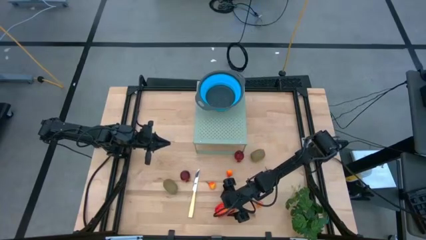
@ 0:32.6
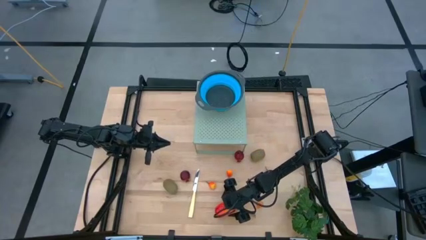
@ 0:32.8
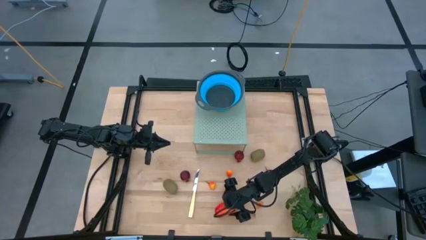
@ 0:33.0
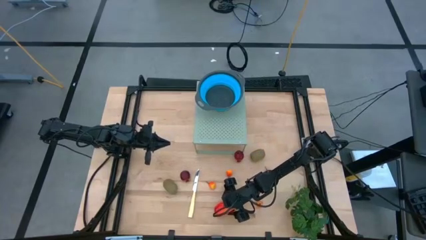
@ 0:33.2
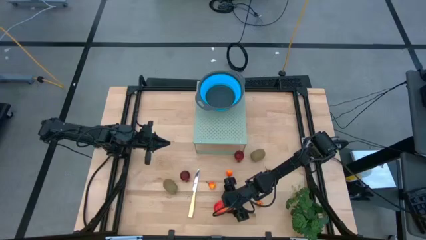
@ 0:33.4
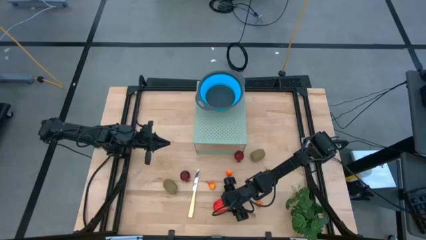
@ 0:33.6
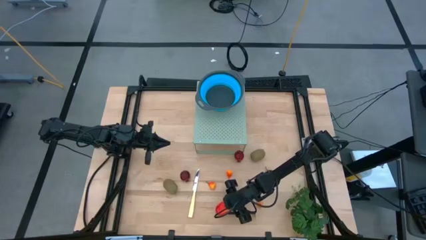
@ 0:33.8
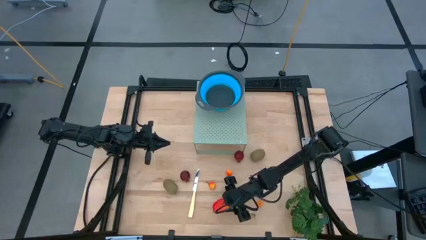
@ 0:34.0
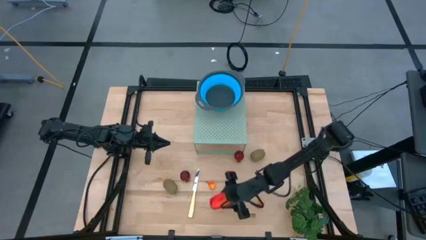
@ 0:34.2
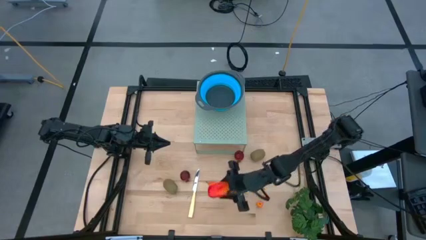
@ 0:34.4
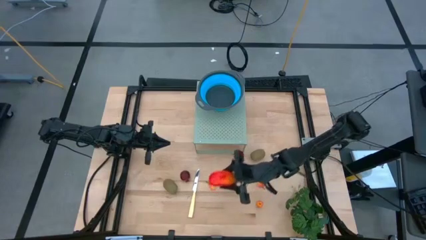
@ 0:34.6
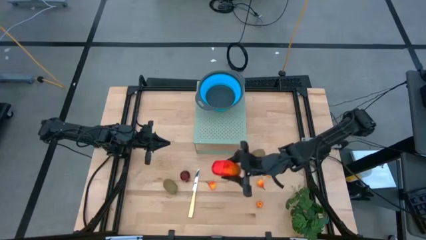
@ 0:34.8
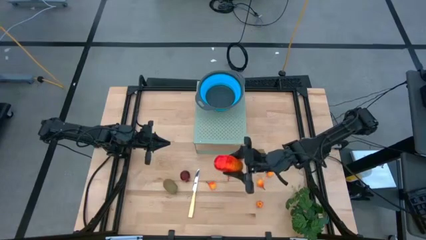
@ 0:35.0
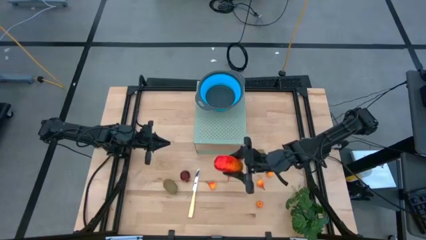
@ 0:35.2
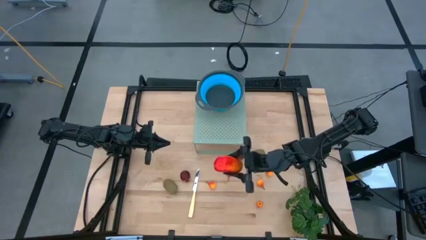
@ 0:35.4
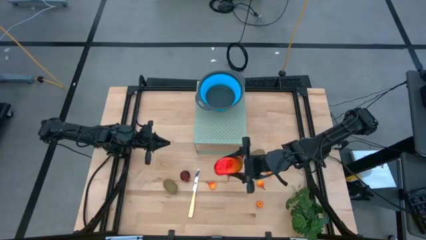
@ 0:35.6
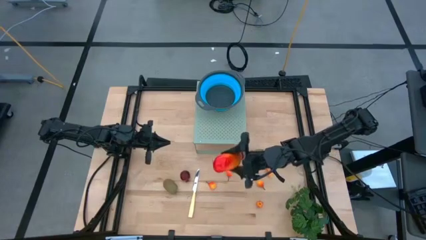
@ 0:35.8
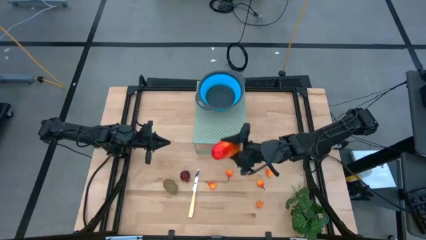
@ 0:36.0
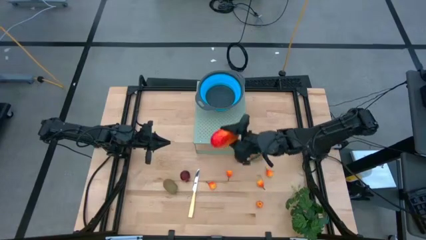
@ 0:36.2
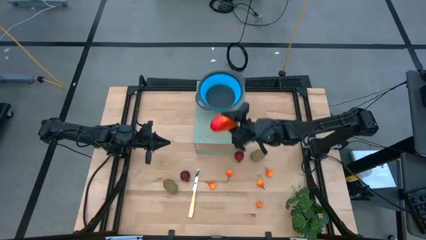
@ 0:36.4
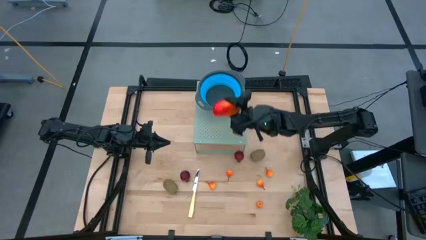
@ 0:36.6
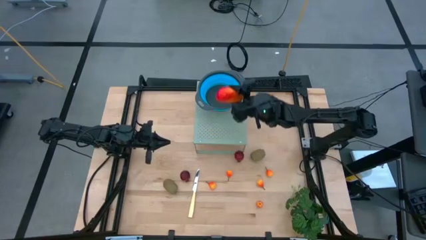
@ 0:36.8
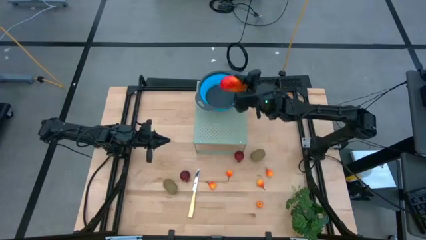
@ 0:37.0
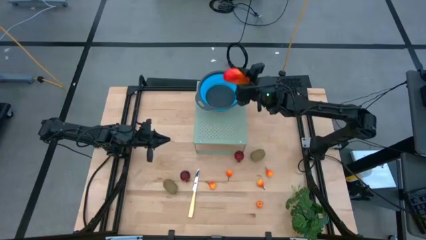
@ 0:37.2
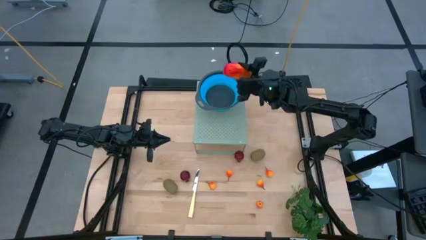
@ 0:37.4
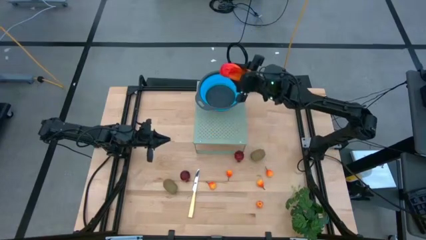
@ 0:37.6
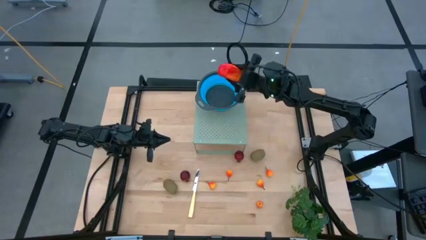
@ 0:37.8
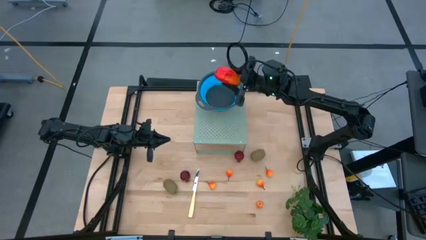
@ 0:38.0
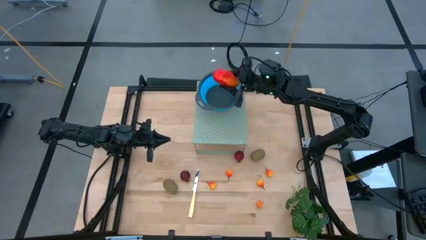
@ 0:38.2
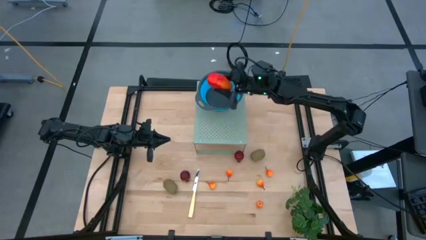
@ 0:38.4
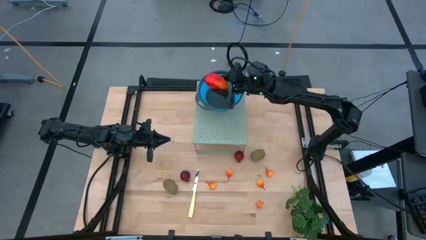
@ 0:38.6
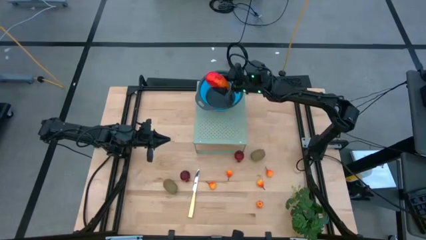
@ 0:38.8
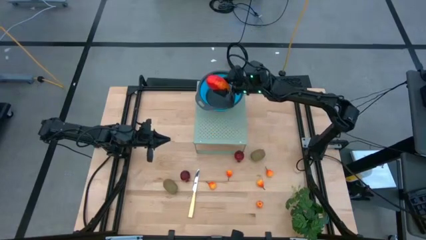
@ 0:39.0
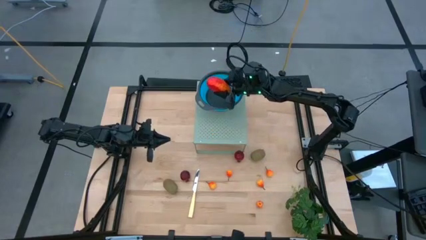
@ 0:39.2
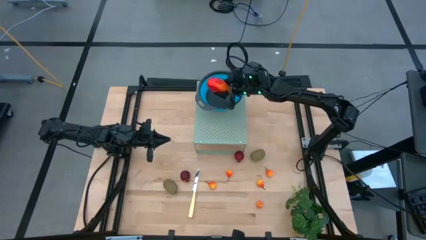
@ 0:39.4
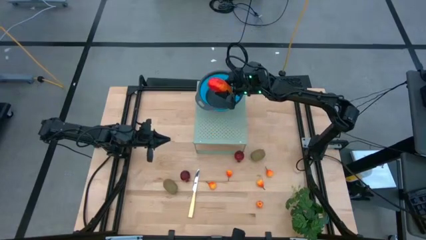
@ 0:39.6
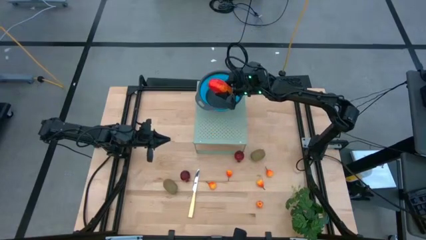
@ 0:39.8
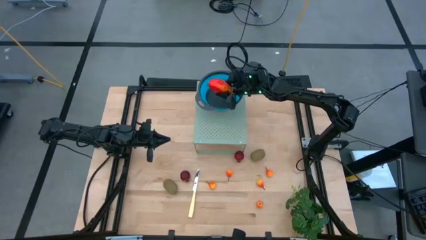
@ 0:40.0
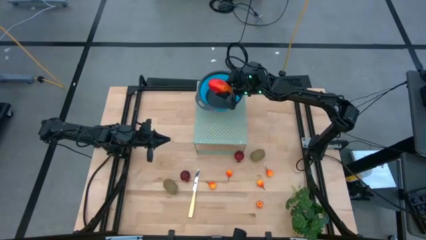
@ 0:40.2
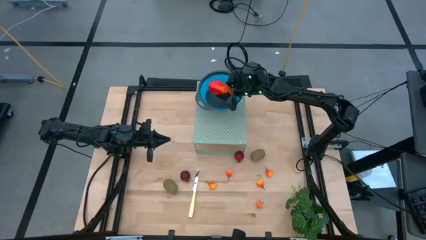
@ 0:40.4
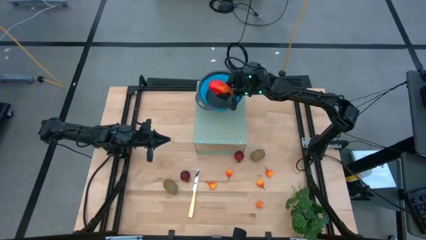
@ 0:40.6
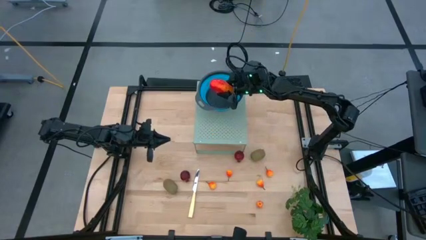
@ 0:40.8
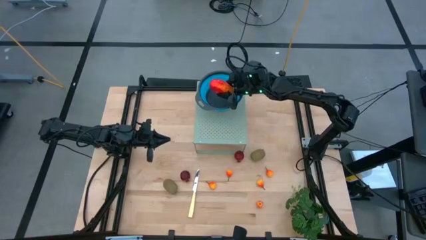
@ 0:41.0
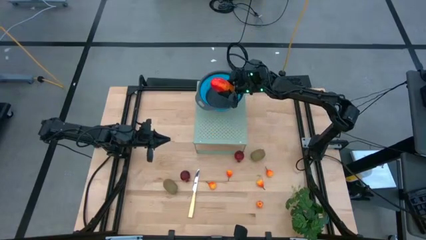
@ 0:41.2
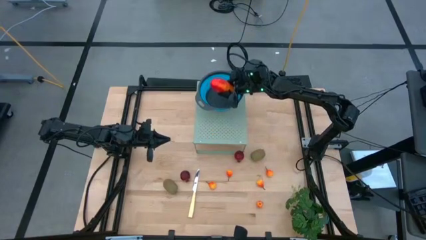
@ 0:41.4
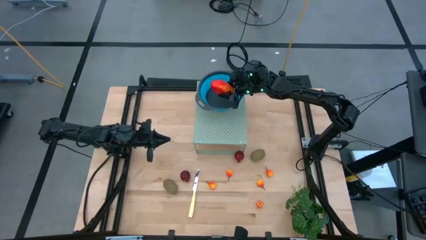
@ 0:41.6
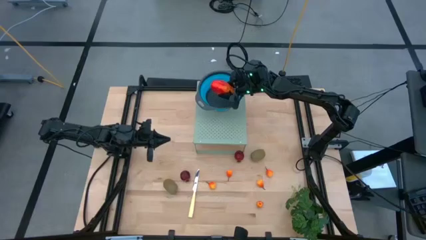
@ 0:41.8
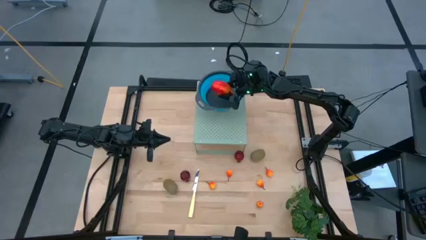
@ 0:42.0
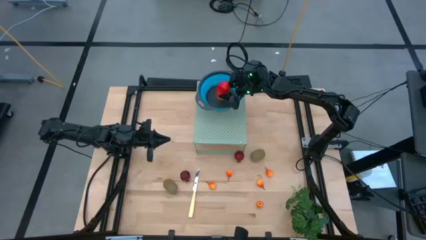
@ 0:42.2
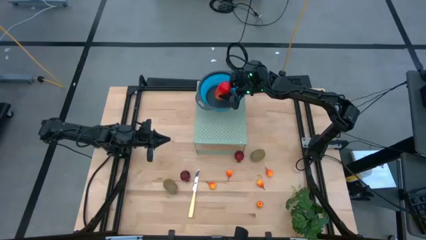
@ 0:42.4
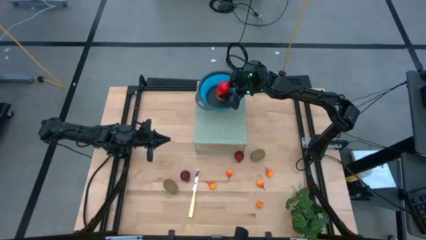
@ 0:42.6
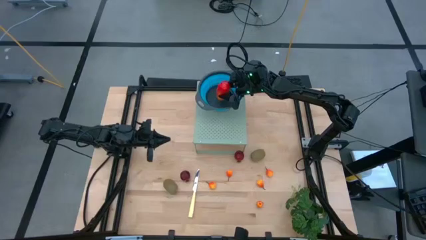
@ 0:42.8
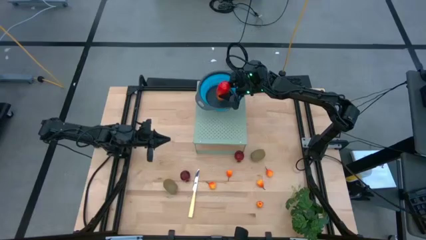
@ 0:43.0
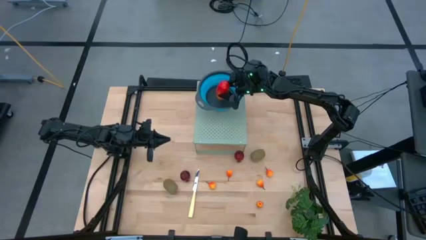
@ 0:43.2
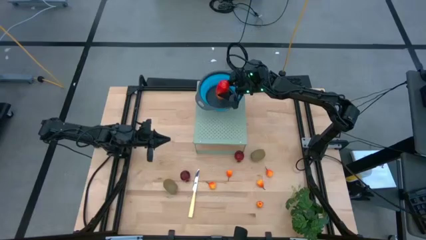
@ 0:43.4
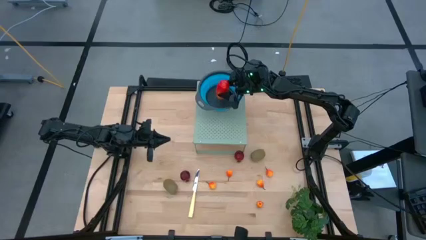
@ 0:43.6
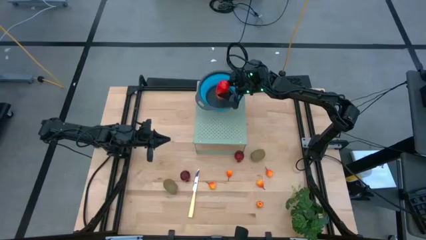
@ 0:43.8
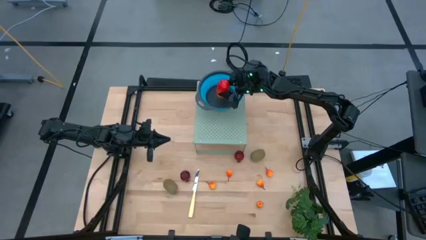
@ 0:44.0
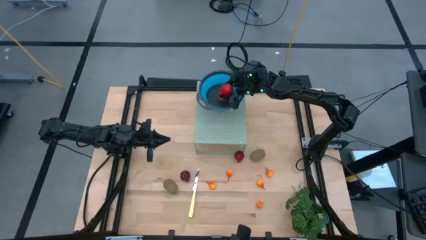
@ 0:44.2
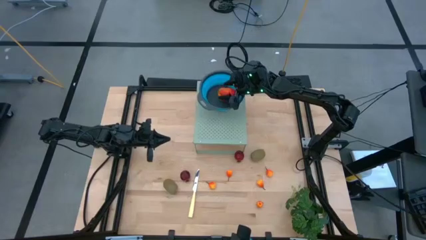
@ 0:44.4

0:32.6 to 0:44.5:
Task: Pick & Place Fruit
Put the mango into the blue strainer bowl on the shelf
